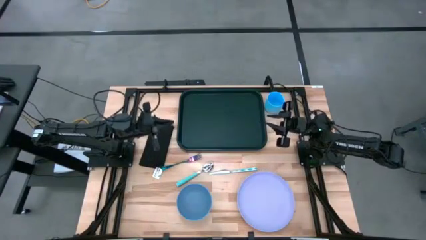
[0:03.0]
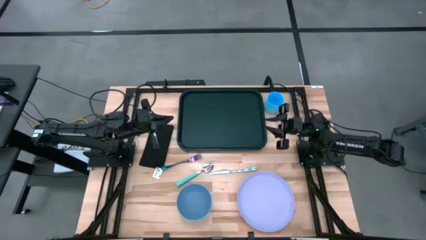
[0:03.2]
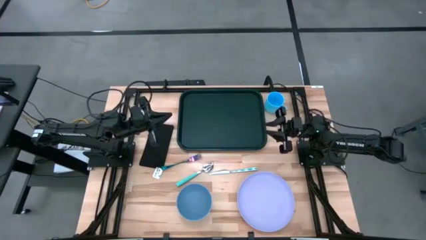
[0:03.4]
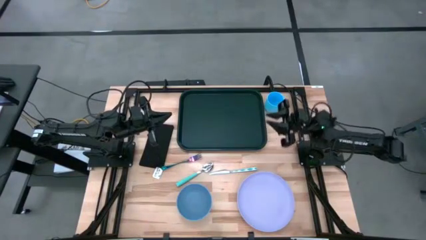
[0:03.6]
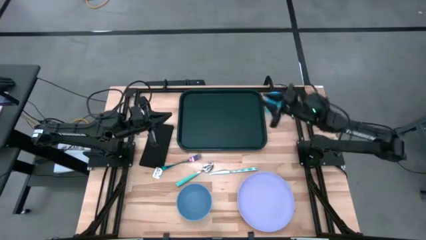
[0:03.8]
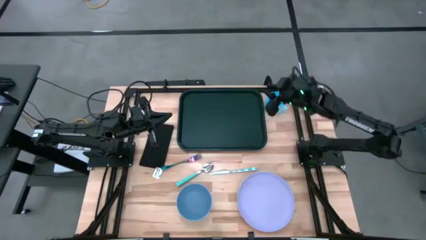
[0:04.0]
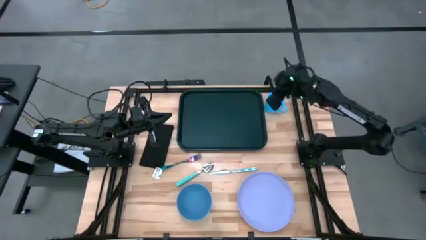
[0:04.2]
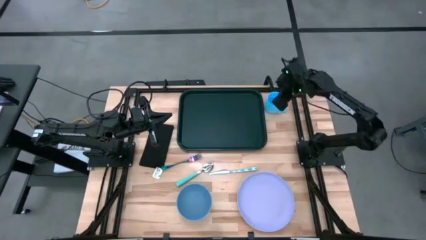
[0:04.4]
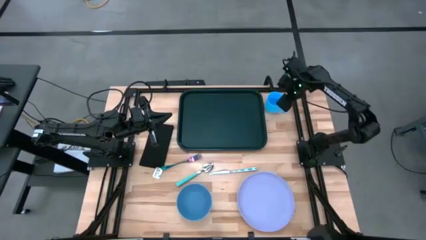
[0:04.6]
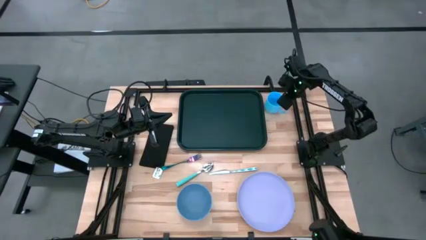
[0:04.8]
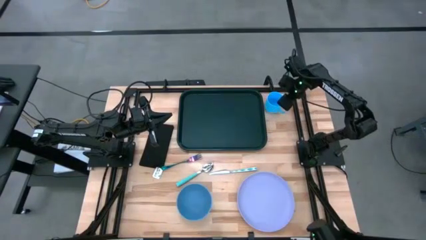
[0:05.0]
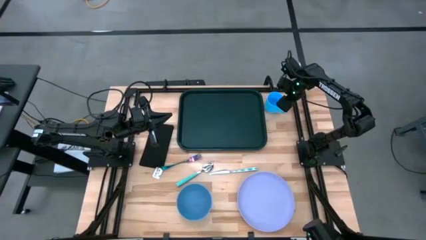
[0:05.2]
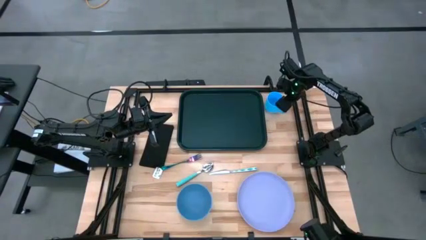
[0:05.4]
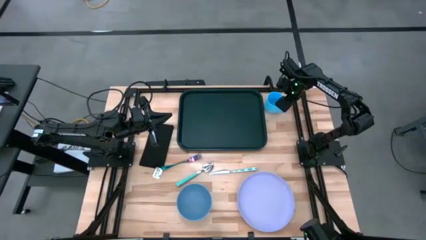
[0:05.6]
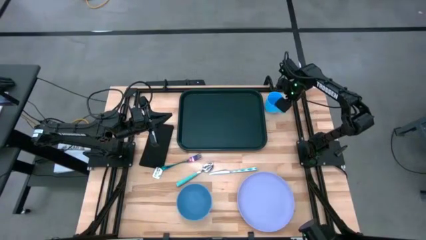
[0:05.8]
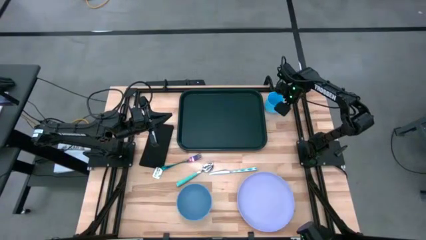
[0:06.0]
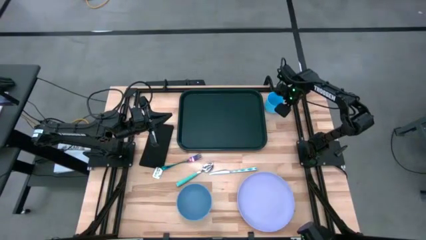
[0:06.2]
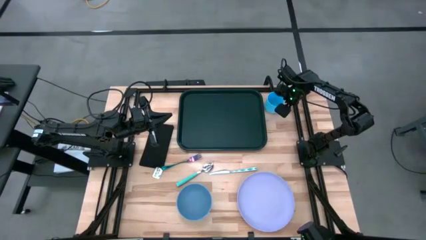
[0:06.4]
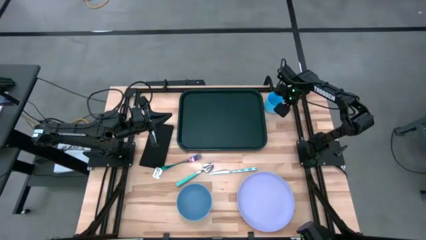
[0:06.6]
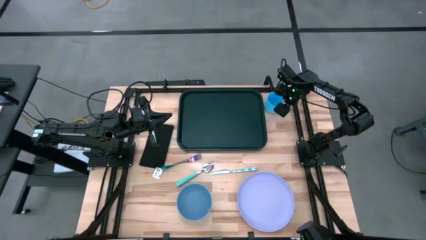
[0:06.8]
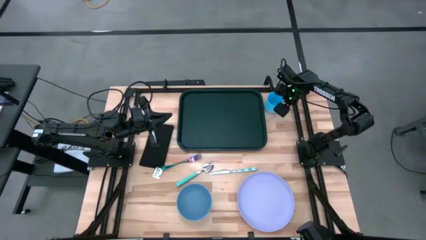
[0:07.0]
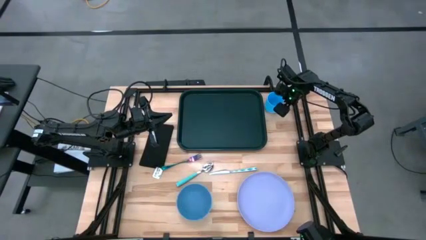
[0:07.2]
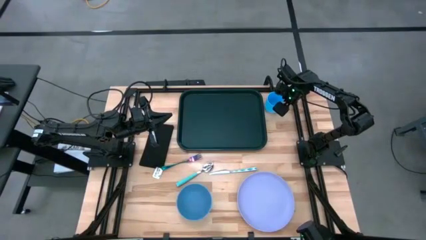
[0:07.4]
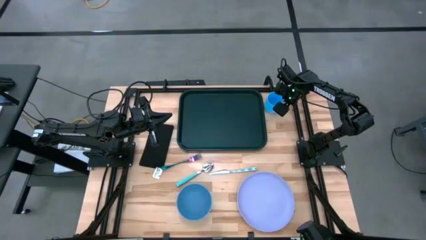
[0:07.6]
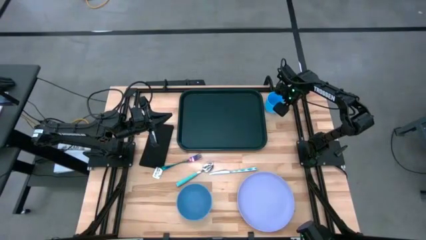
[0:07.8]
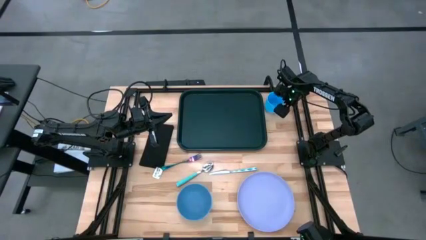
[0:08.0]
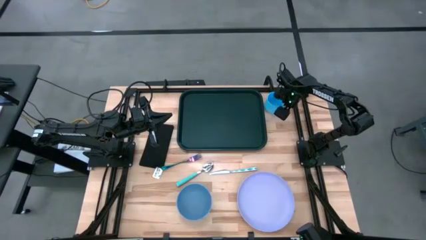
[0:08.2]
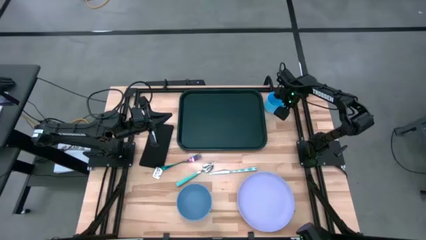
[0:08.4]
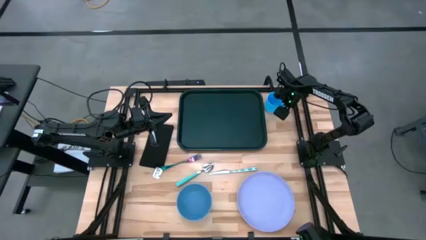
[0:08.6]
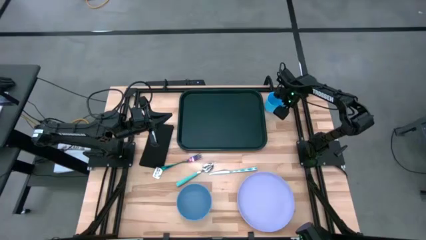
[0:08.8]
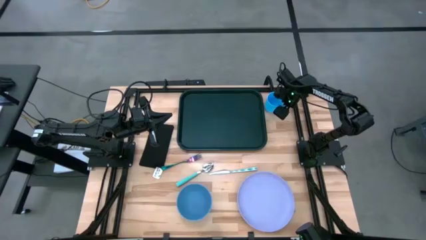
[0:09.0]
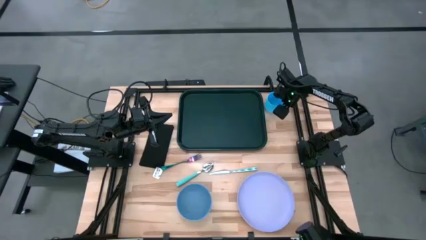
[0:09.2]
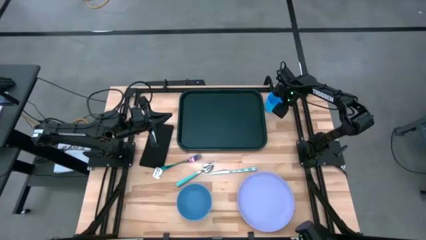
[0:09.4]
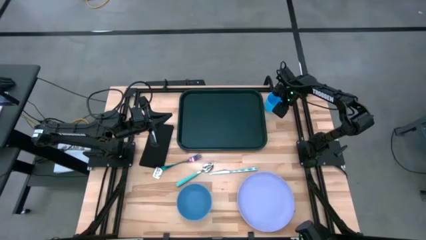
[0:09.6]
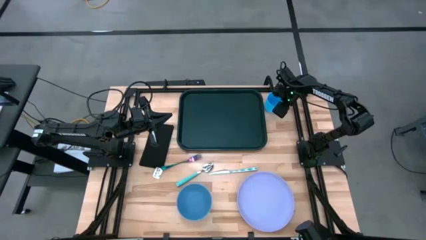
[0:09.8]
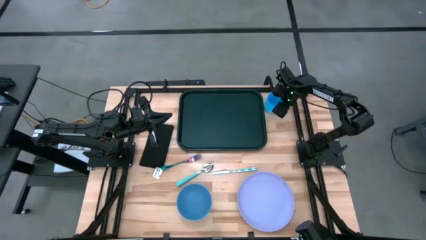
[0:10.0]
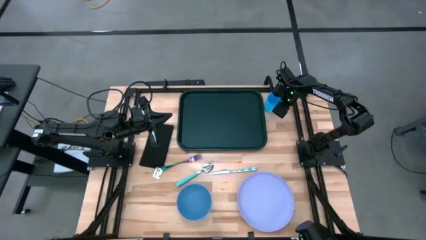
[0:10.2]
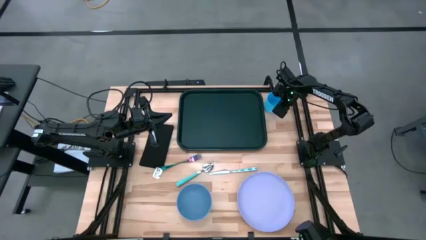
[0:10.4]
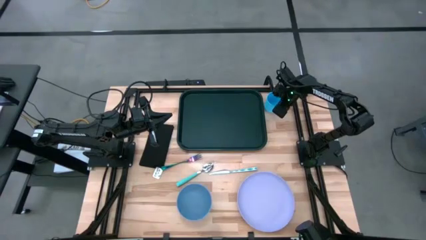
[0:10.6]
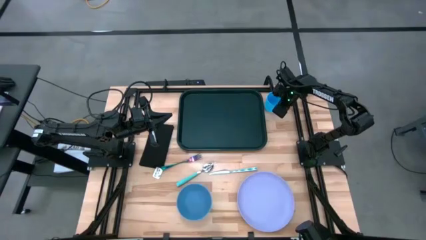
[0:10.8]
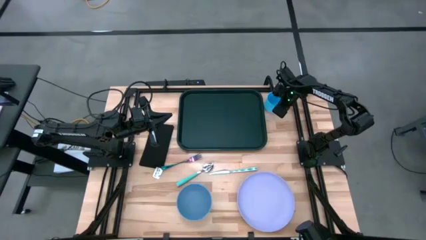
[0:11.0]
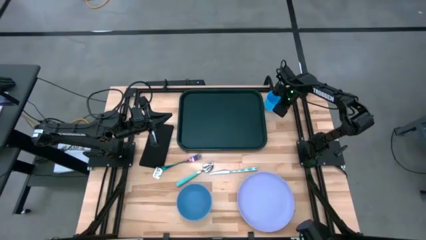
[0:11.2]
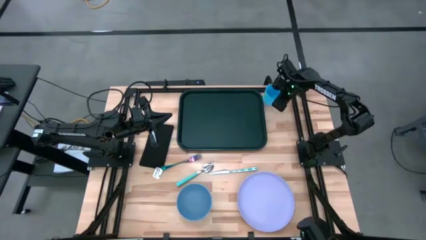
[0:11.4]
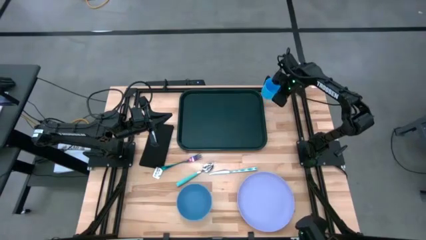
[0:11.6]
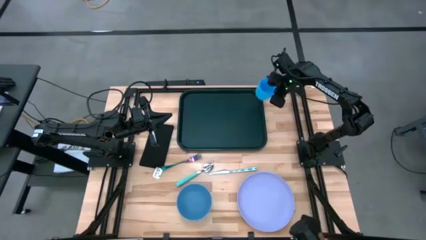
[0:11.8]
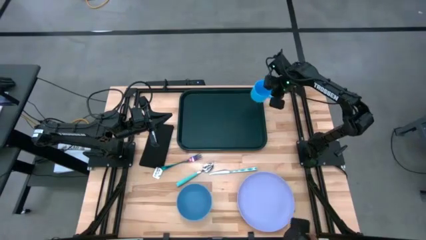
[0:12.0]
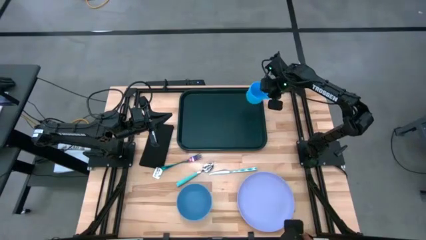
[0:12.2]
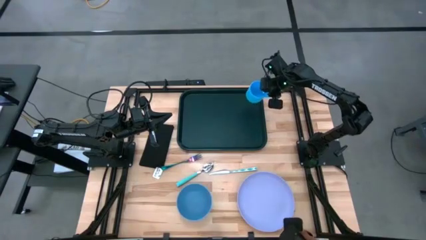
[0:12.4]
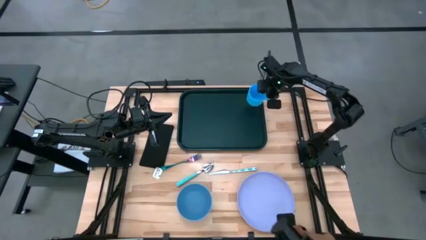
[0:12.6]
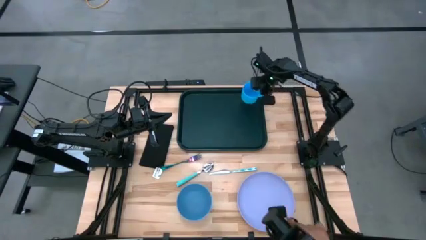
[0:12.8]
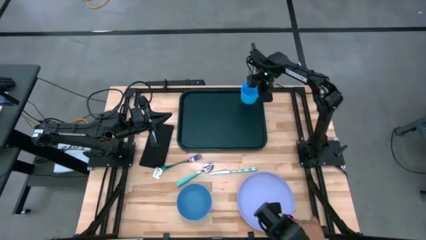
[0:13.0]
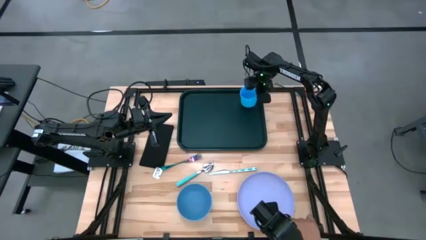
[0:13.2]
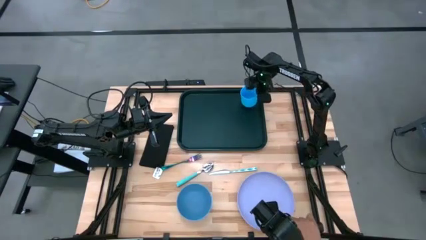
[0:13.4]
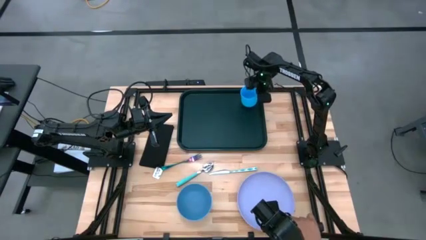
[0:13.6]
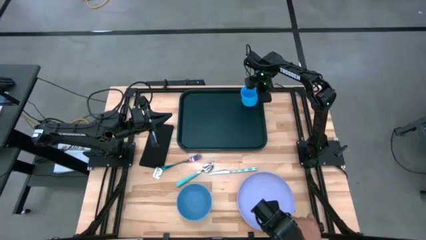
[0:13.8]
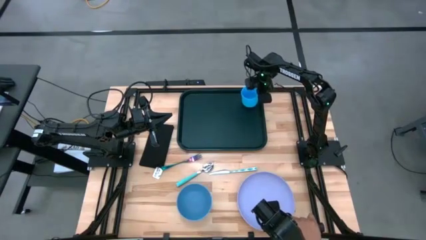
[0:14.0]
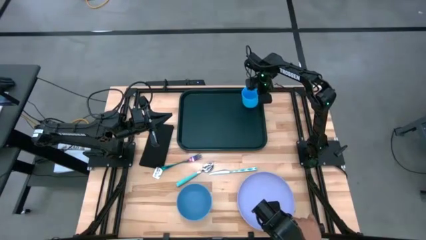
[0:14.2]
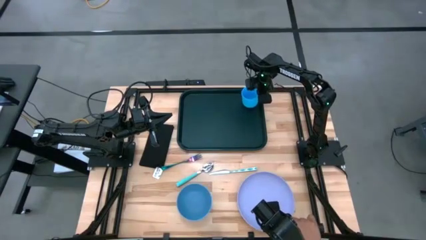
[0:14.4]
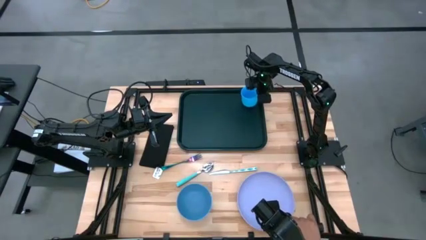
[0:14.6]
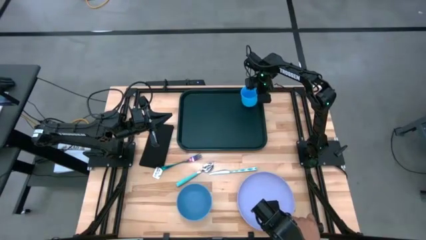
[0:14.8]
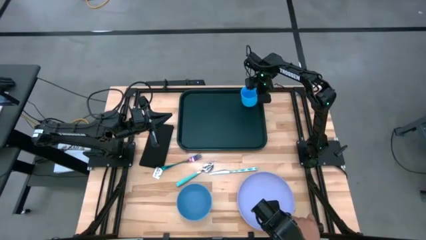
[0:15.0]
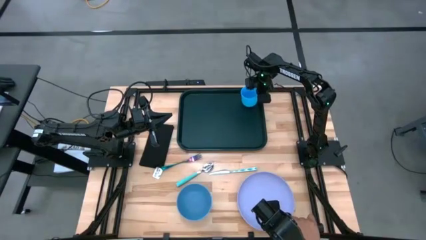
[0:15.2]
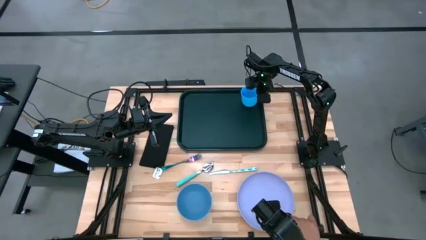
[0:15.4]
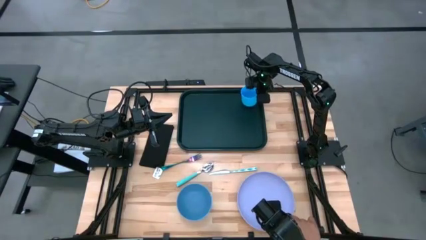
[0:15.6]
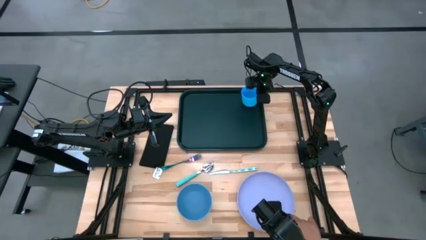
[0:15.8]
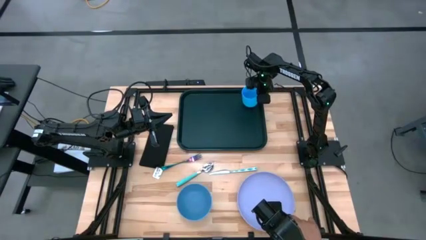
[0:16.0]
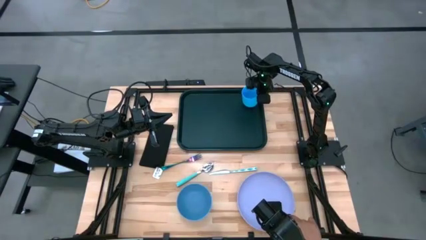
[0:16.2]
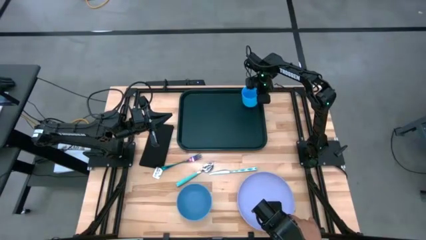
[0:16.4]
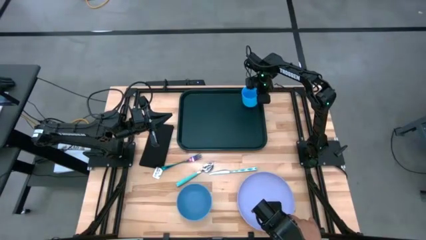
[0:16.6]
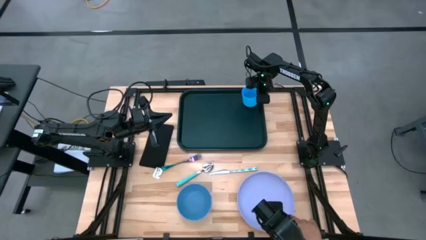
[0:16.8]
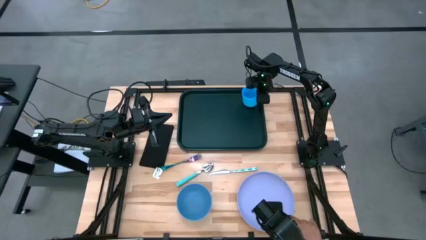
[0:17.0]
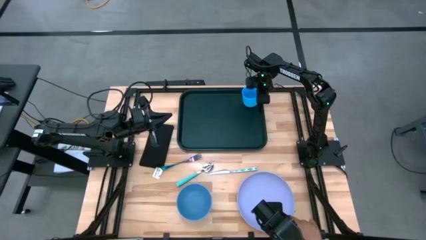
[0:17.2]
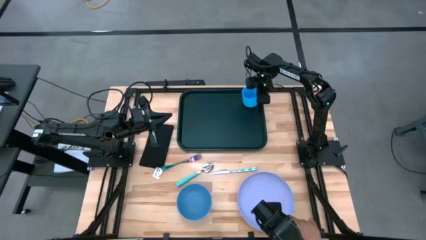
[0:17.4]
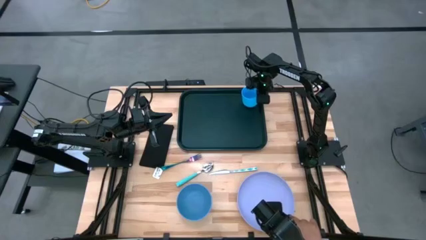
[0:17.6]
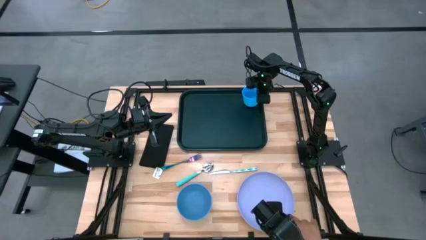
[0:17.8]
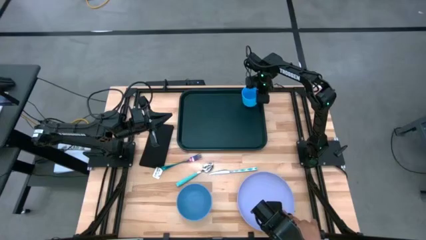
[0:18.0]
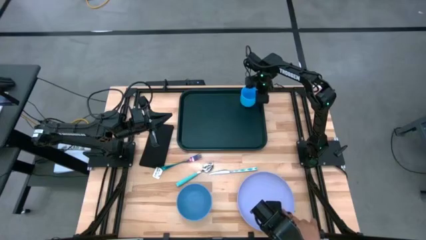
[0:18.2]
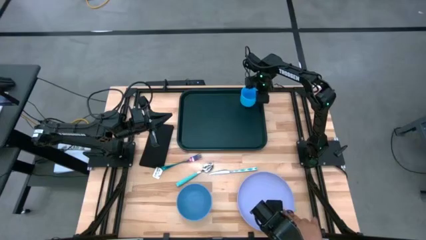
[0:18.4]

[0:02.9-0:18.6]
Task: Set up tray
Put the blue mug on the black serving tray
